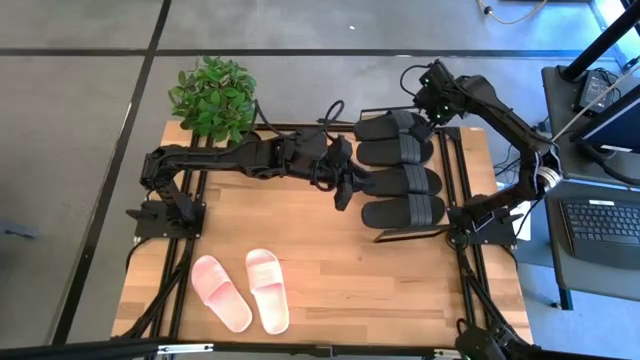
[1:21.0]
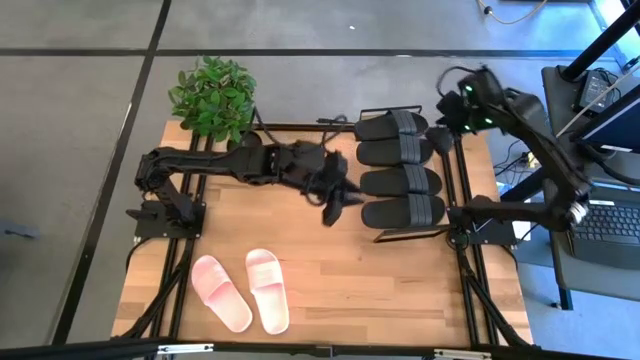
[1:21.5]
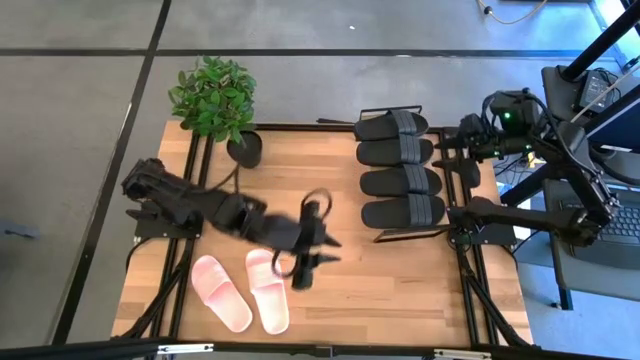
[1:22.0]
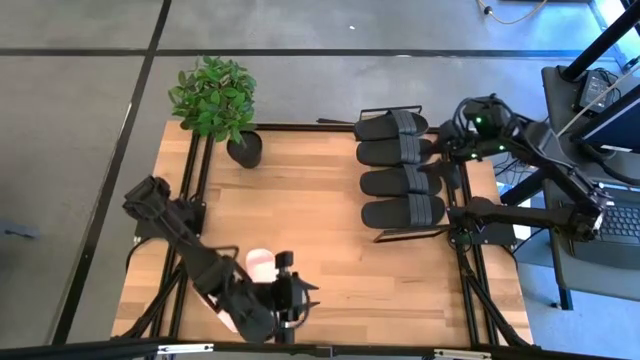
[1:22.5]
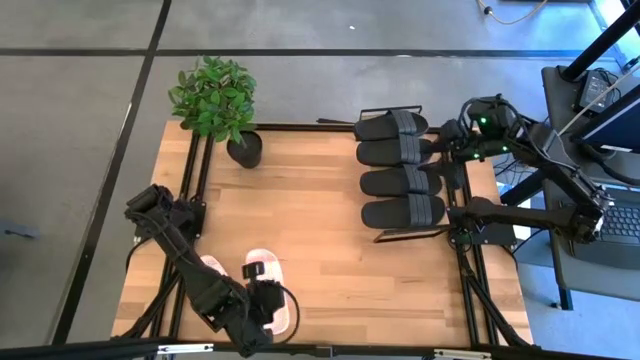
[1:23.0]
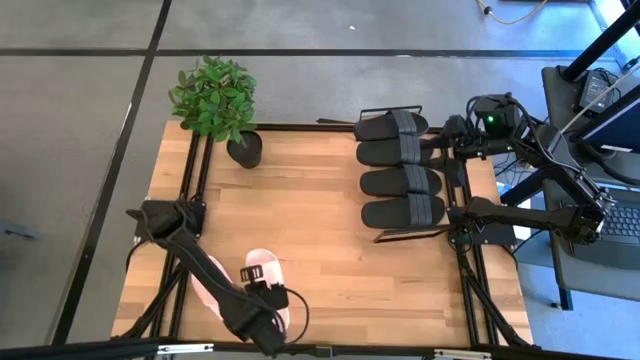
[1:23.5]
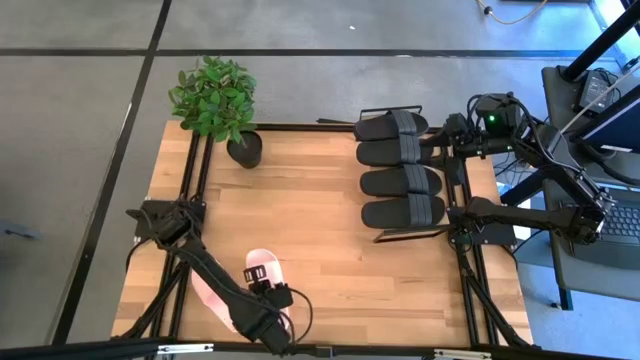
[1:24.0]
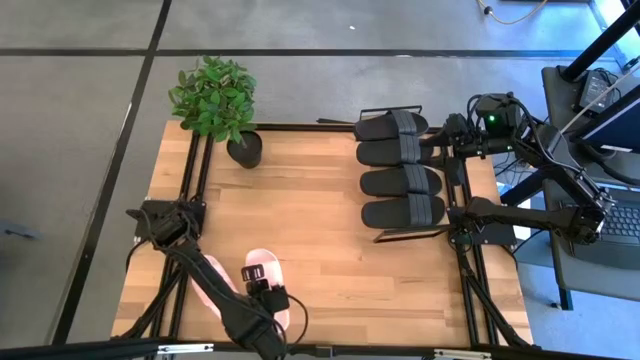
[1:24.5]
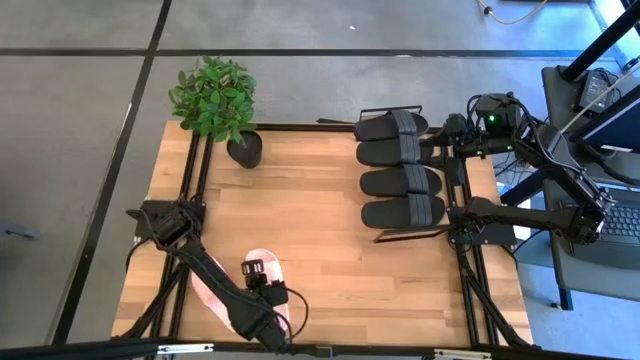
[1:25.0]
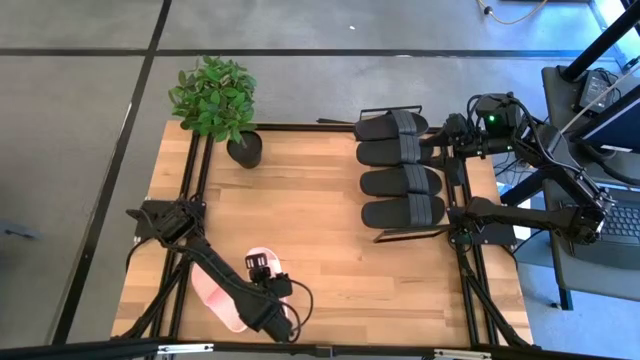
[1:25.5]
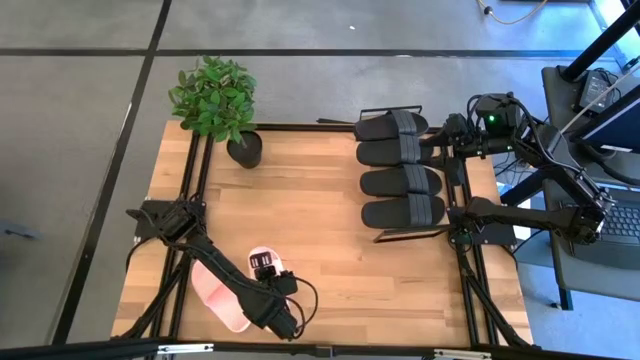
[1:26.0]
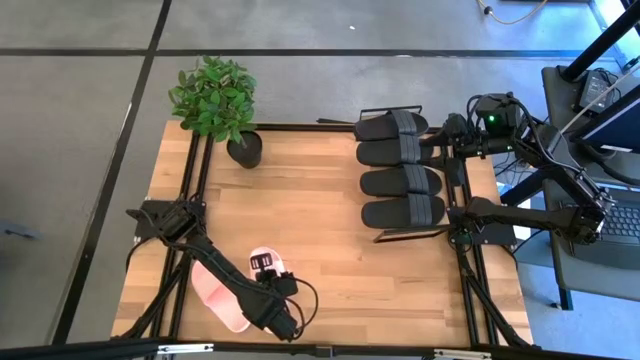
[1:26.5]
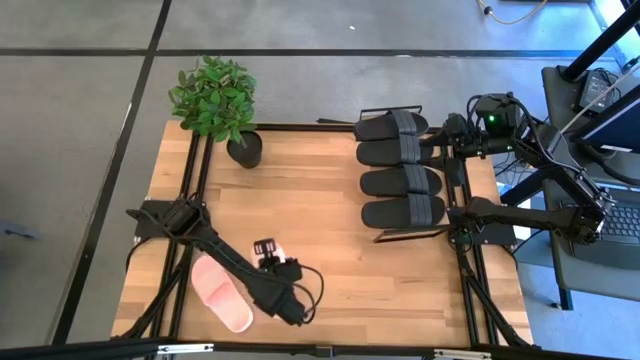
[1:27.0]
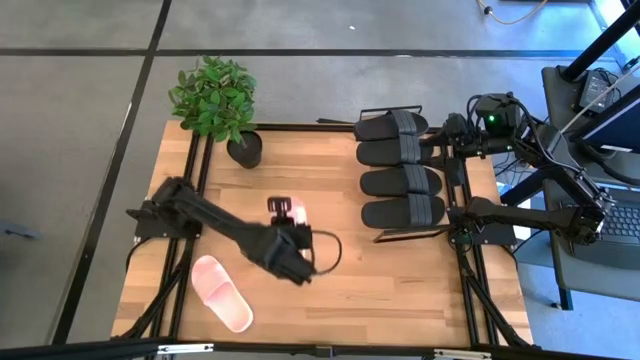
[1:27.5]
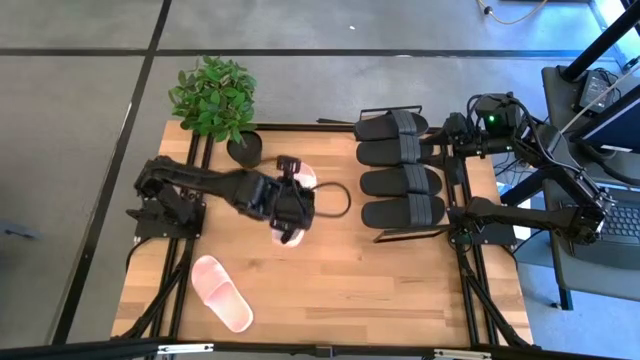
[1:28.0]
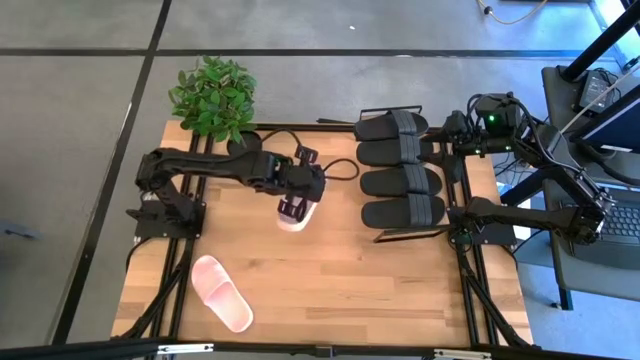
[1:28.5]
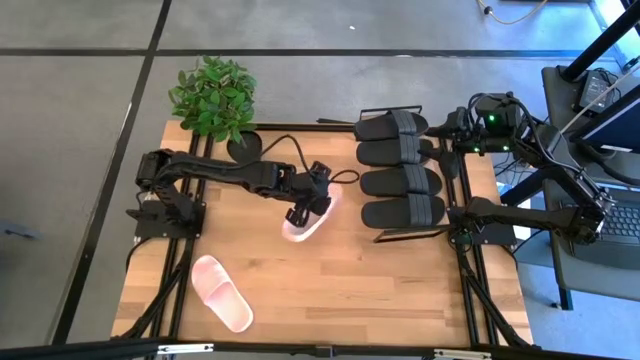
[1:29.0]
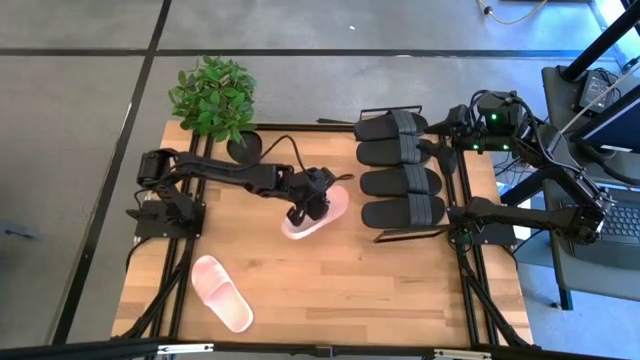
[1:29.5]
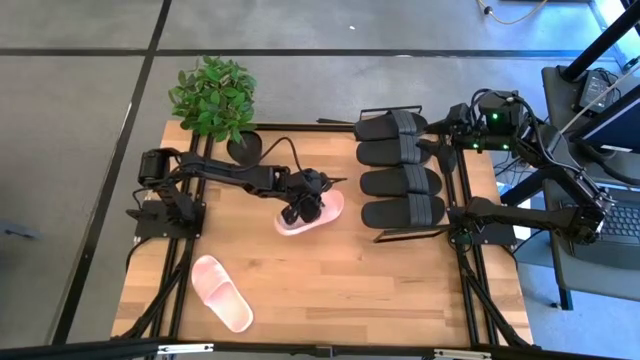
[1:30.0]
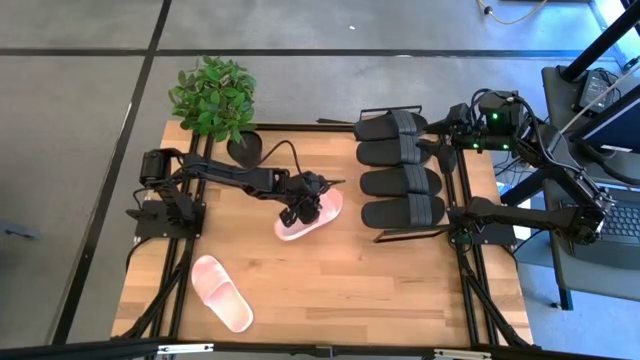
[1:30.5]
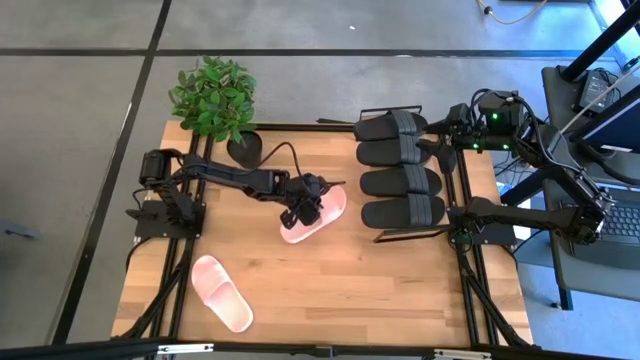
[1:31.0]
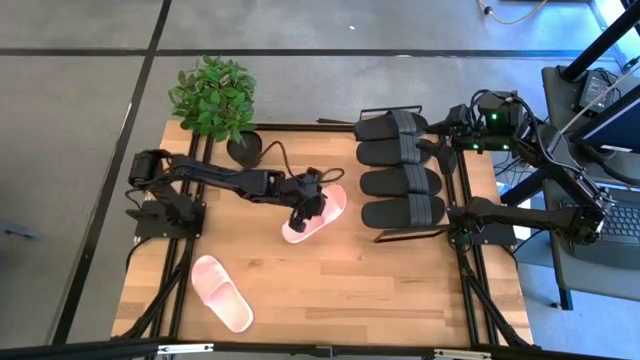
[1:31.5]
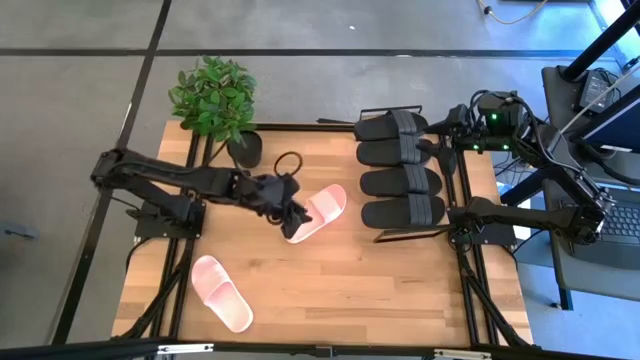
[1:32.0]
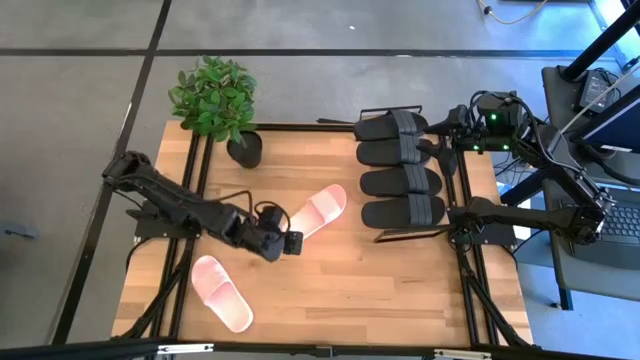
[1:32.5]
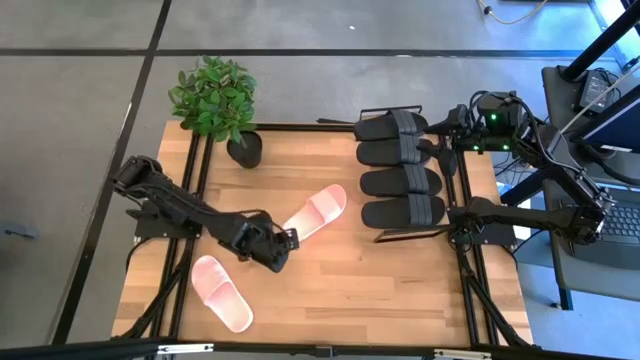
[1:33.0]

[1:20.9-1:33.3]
Task: Pick and place slides into the shelf
Put the pink slide under the shelf

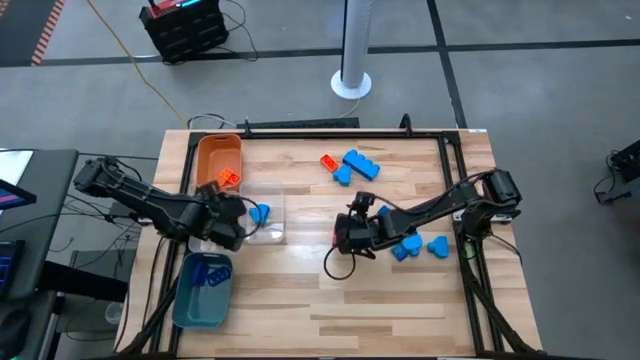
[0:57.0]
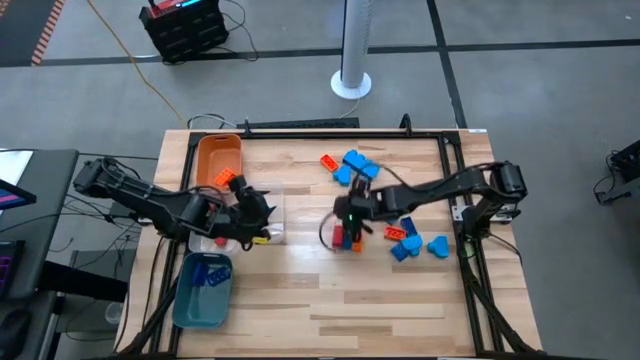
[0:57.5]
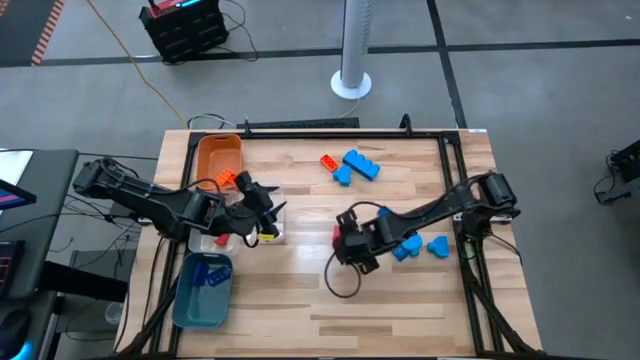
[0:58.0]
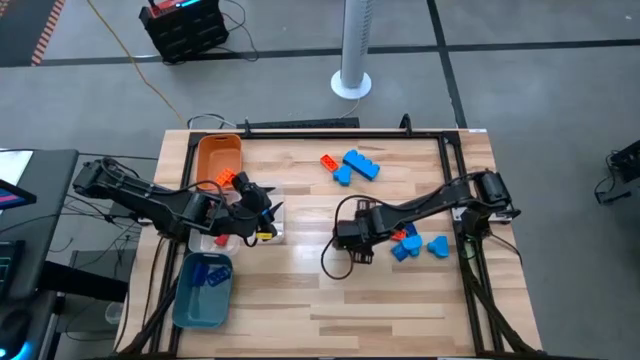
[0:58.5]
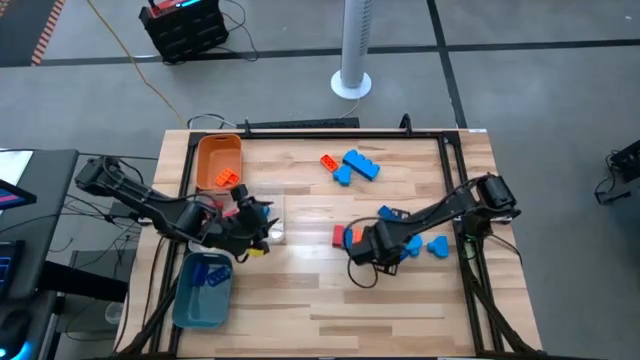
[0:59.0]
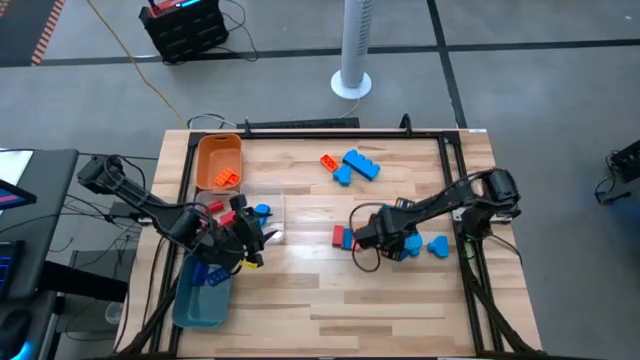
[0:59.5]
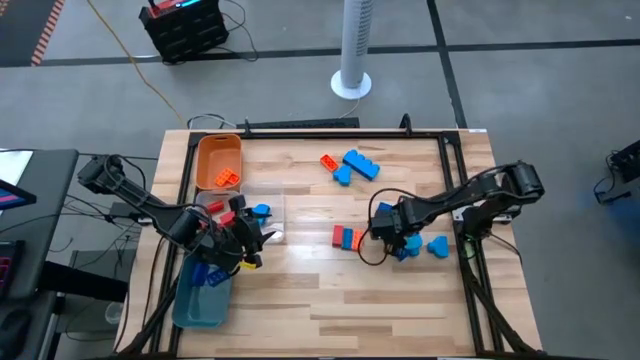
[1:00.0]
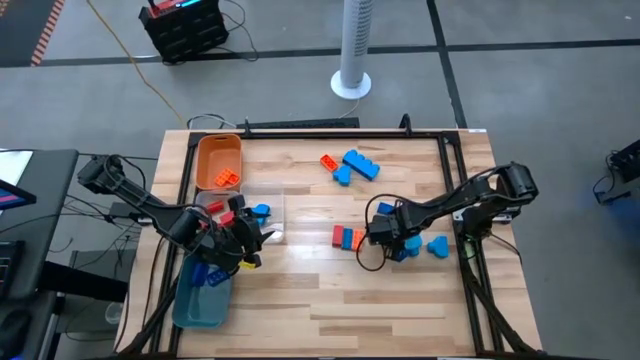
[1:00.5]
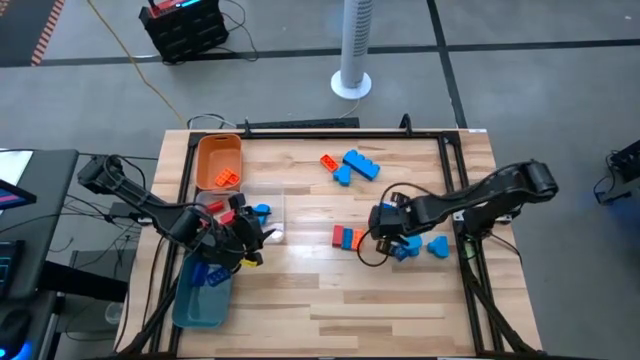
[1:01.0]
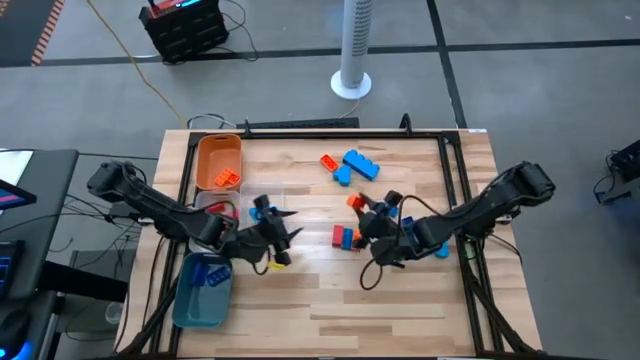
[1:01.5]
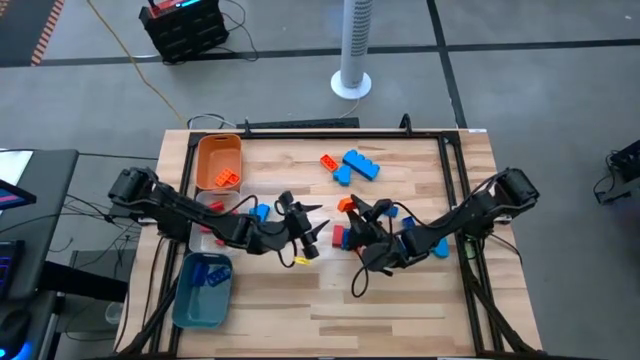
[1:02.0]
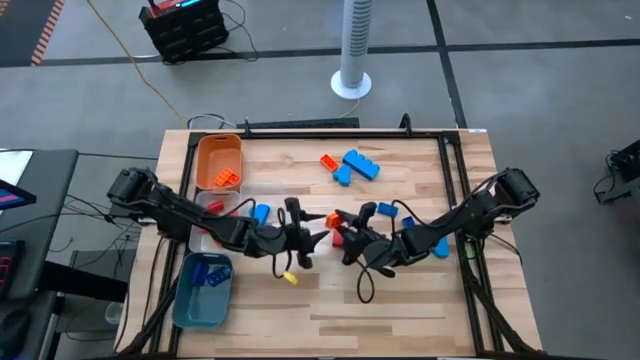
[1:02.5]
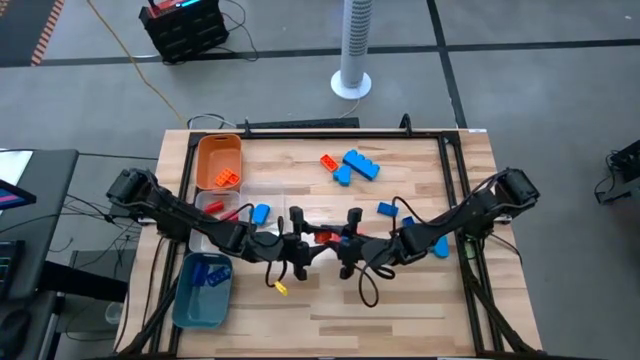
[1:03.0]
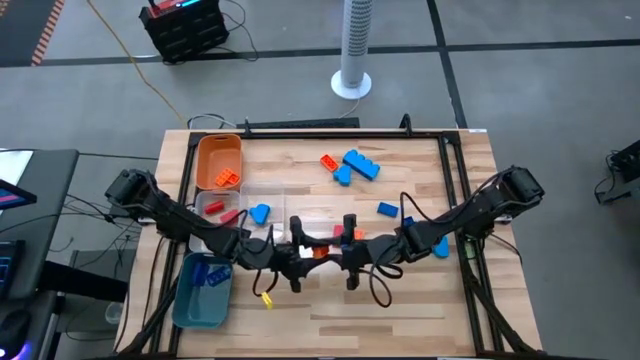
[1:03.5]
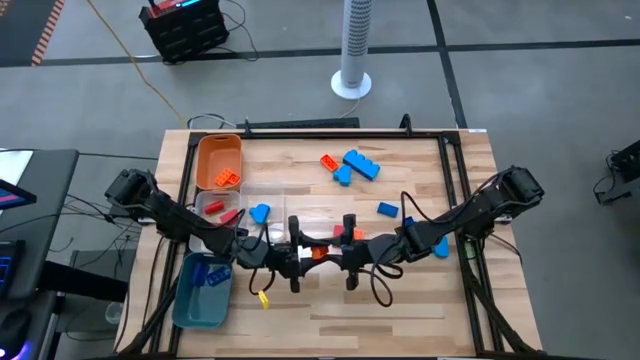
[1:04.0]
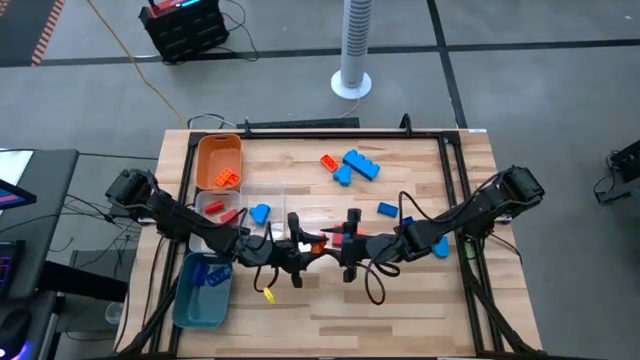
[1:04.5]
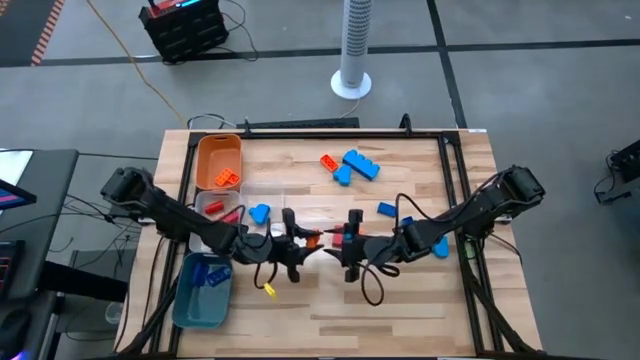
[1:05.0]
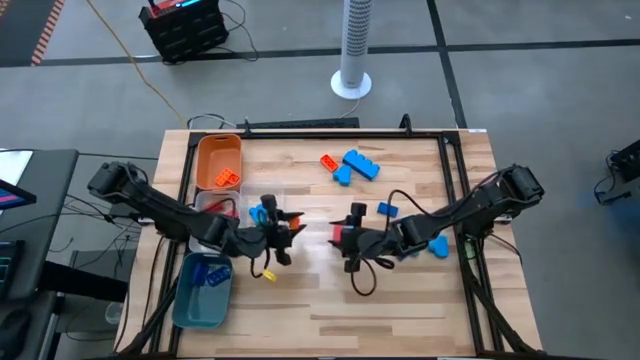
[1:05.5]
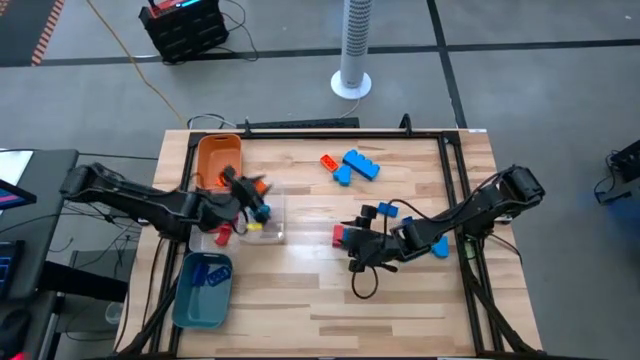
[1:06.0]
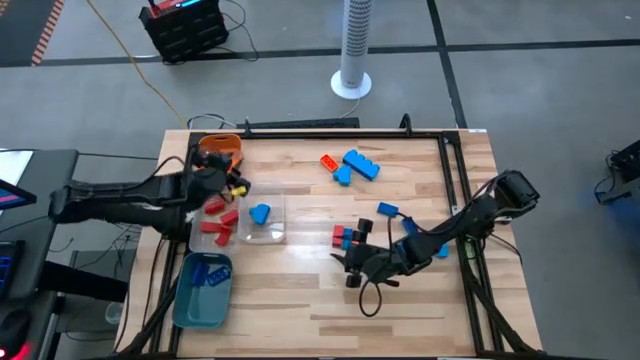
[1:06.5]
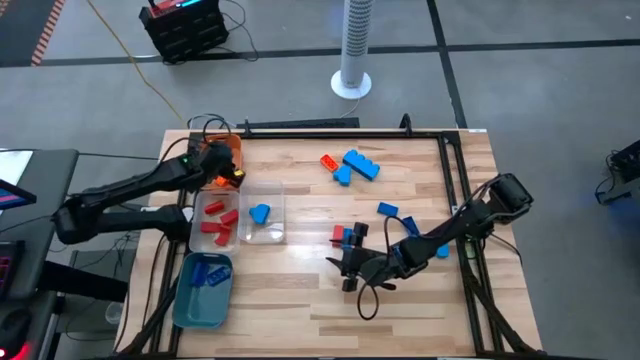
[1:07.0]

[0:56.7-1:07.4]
Task: Sort blocks
Put the orange game piece into the orange bin
